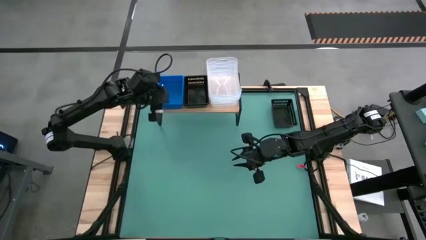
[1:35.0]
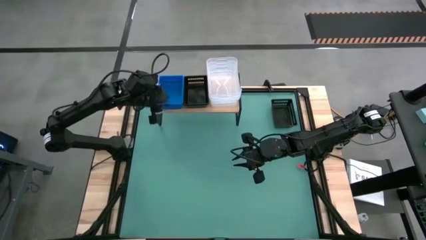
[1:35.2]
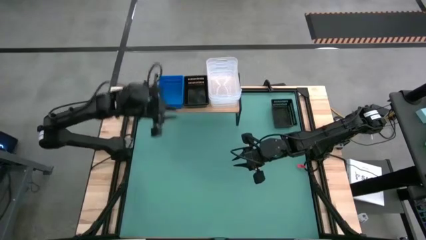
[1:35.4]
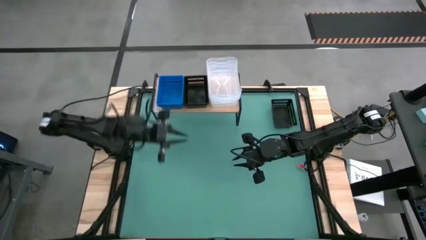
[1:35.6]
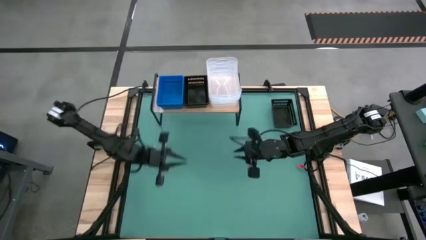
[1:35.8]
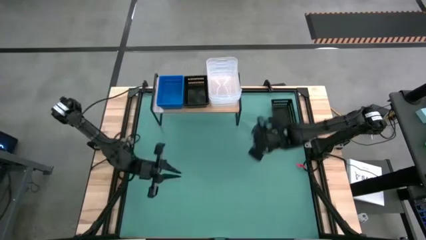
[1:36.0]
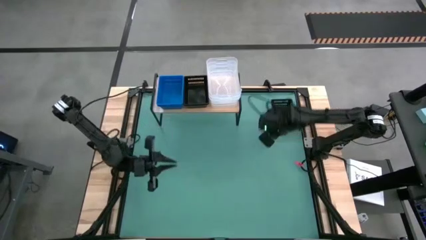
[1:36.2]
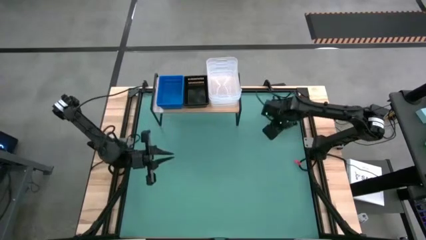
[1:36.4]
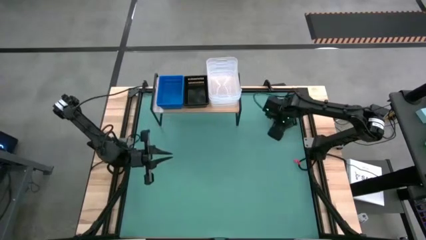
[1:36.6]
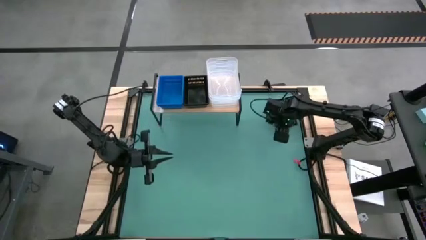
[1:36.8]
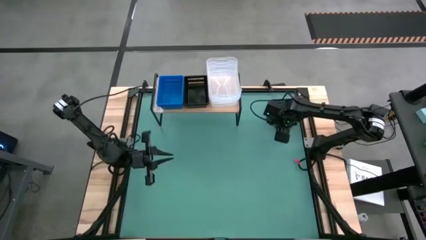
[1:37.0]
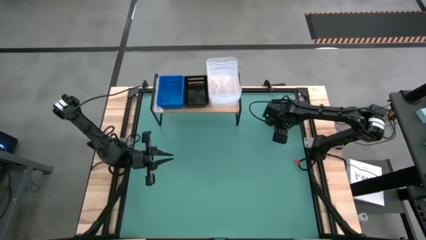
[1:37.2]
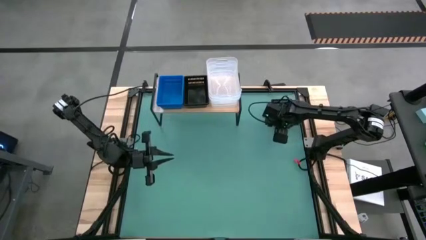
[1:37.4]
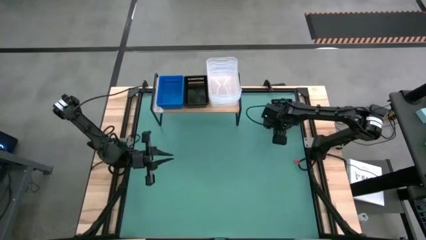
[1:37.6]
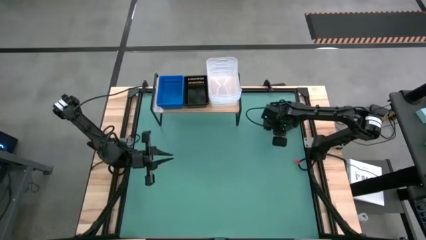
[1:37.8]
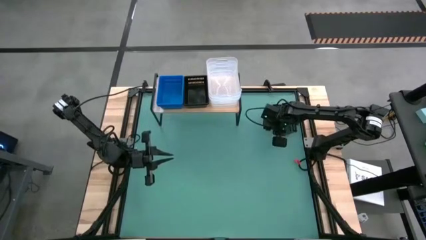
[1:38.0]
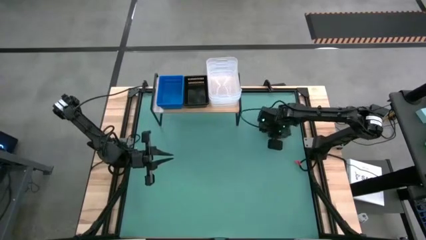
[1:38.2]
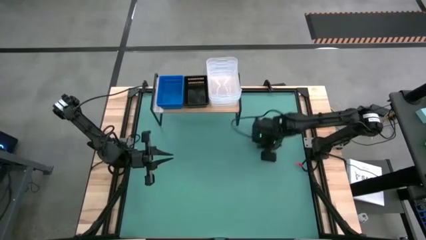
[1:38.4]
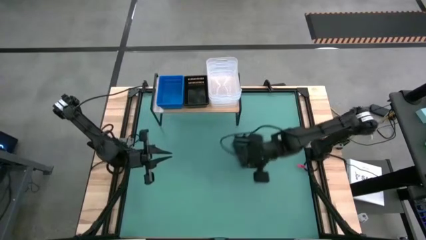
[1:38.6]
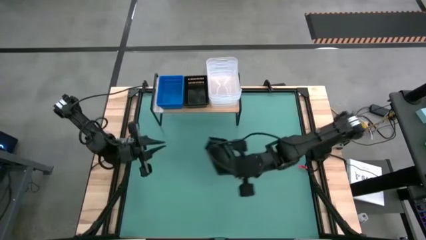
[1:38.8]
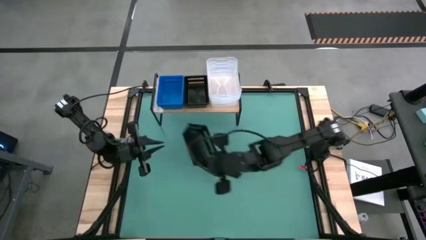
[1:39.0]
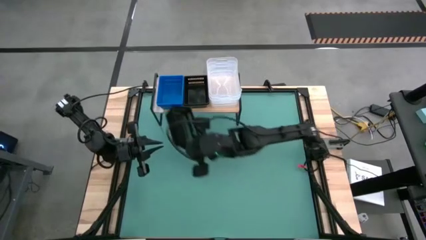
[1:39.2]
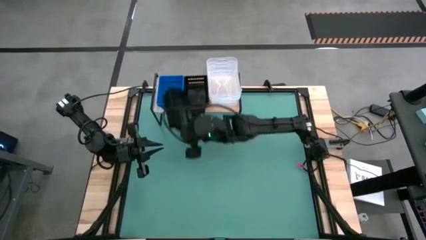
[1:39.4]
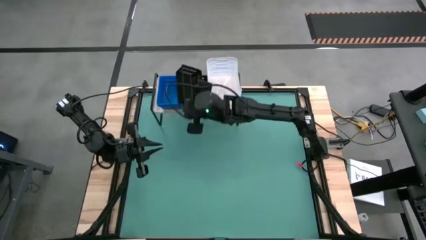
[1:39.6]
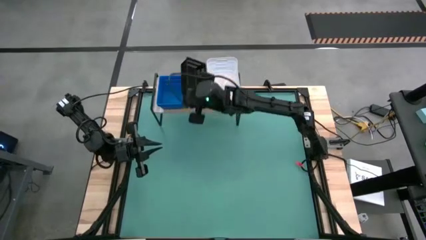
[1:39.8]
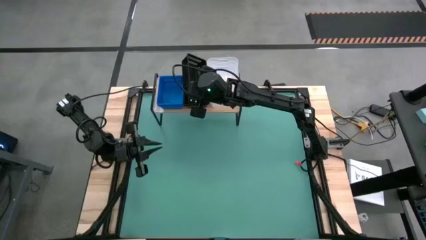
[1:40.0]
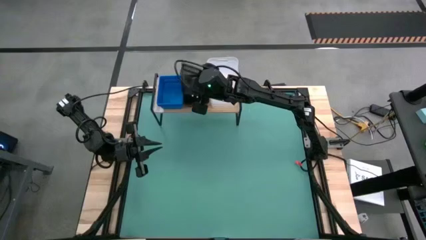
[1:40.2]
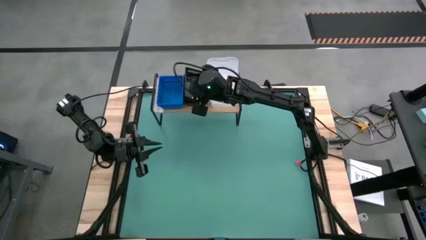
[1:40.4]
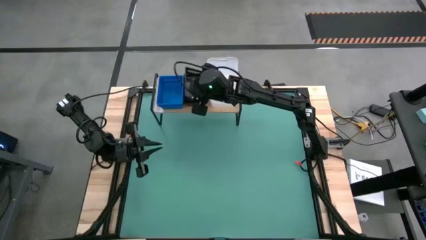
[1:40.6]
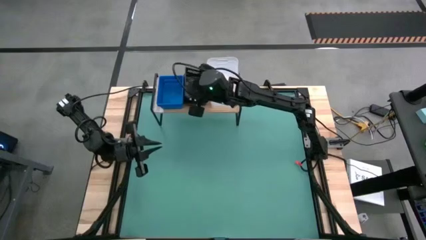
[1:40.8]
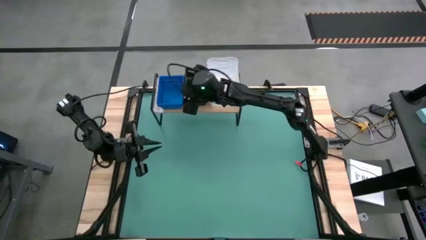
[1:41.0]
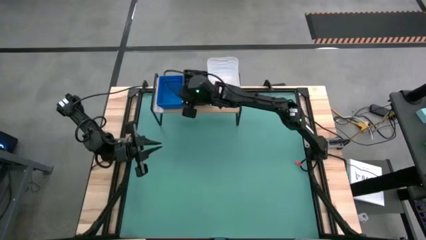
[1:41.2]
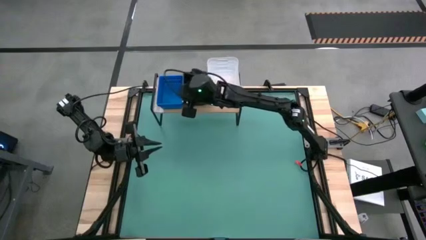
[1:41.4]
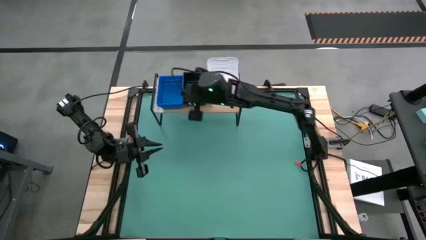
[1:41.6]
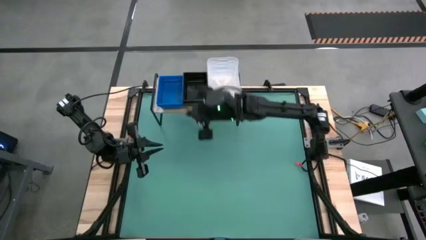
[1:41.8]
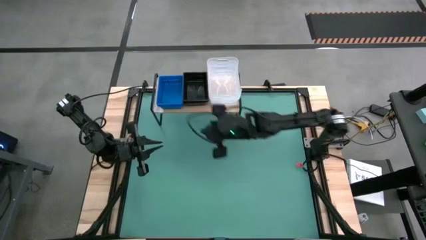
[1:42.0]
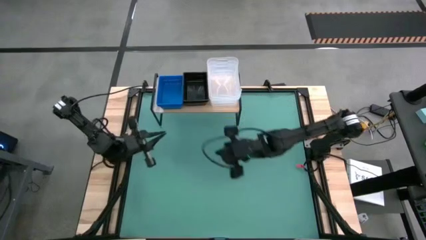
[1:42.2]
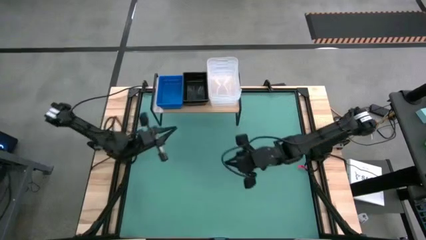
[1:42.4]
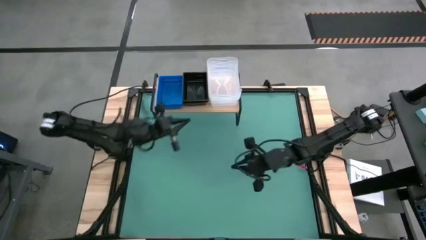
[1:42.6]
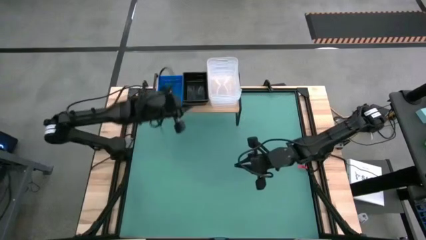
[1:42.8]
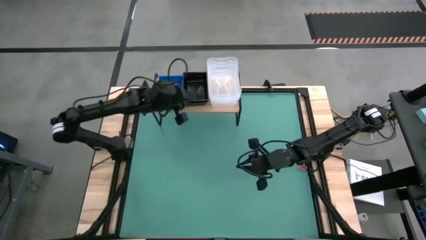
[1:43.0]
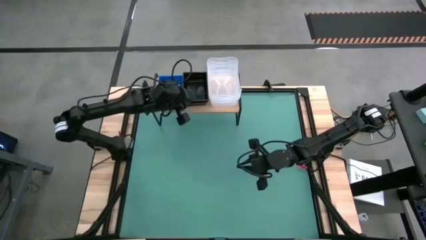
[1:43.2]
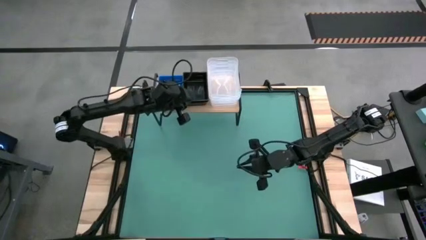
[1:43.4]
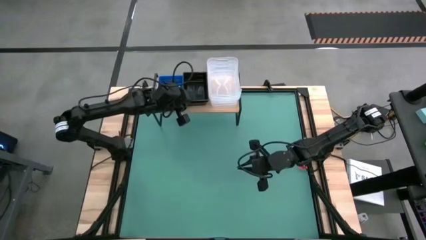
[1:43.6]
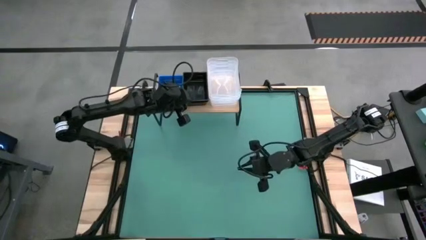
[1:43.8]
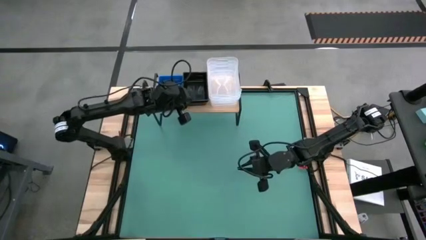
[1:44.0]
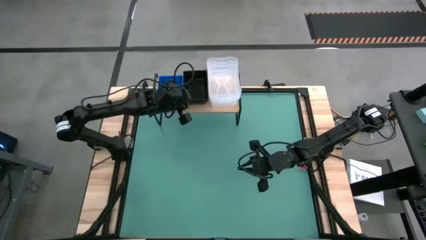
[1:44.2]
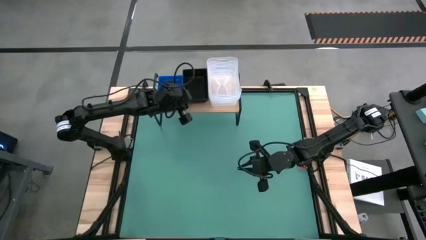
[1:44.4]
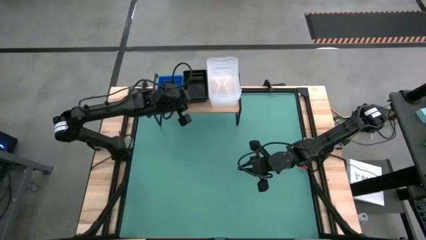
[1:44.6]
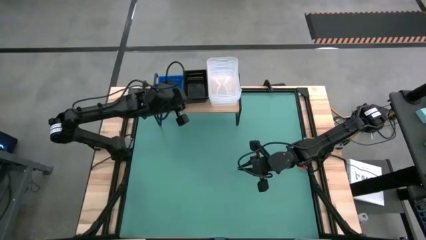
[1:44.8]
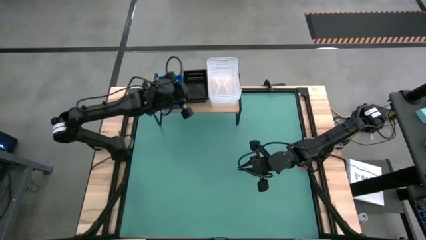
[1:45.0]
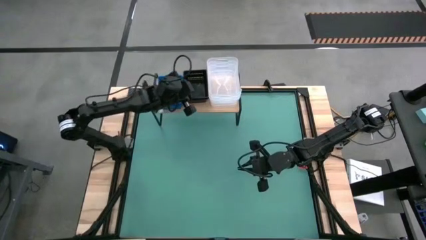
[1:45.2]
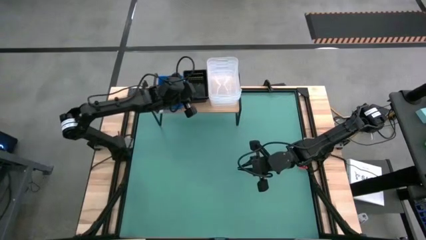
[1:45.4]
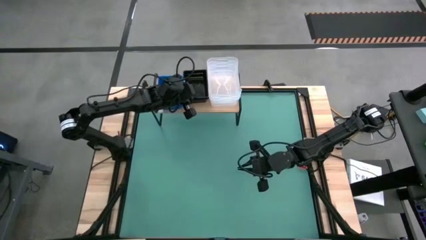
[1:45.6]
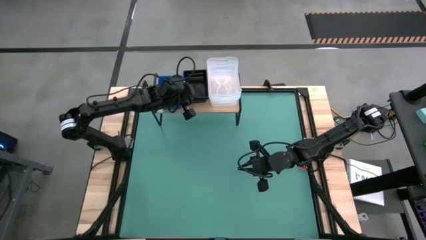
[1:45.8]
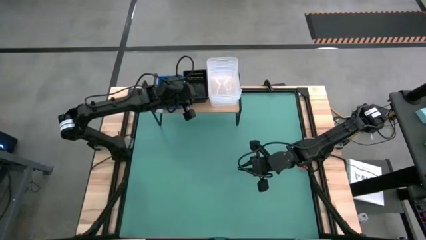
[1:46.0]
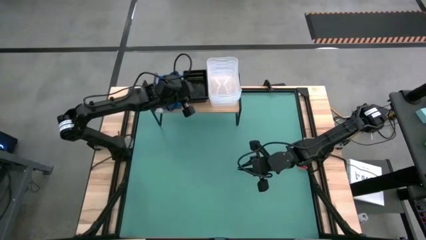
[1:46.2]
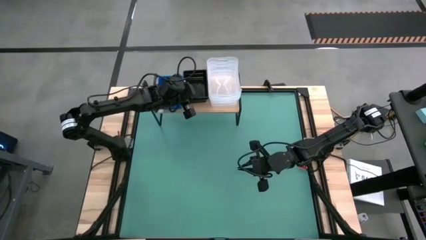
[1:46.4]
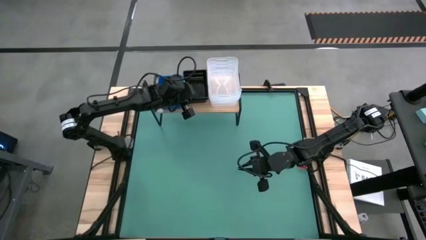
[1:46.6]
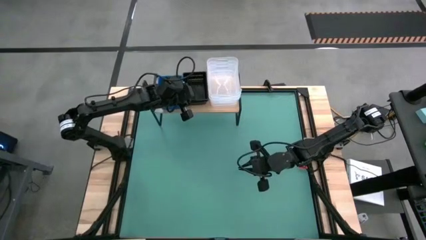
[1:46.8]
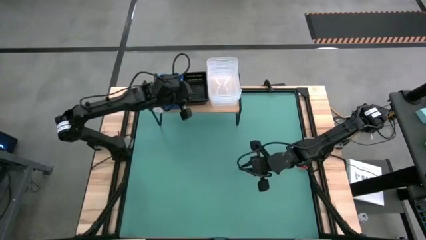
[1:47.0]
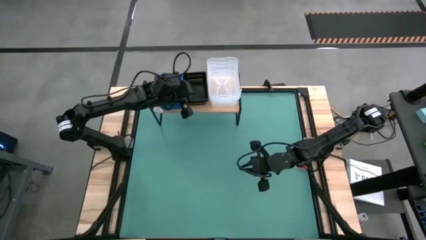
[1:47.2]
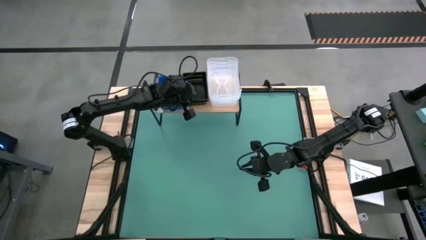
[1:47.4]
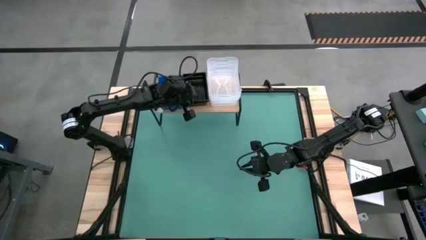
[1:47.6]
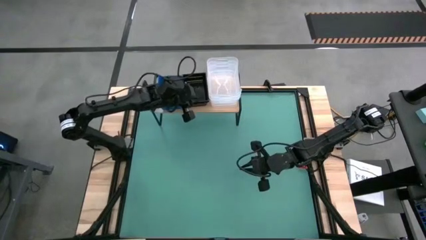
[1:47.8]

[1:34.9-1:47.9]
Task: Stack baskets on shelf by color
Stack the black transparent bin on the other black bins on the shelf

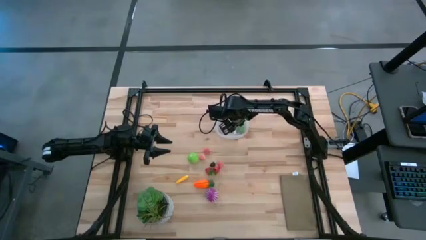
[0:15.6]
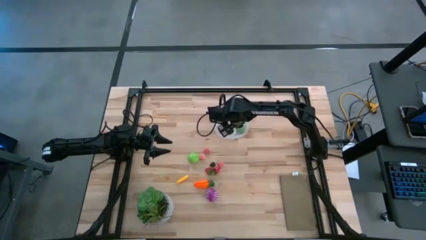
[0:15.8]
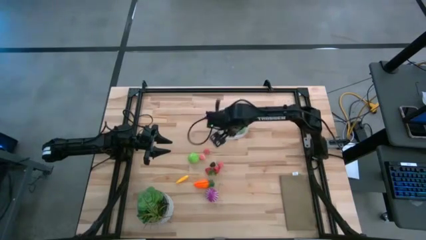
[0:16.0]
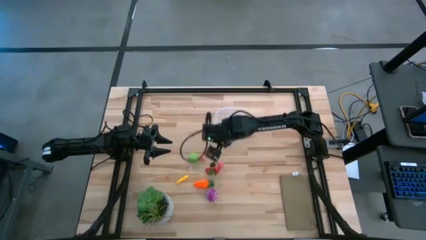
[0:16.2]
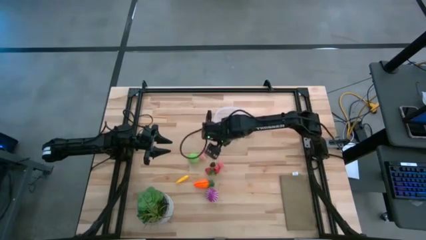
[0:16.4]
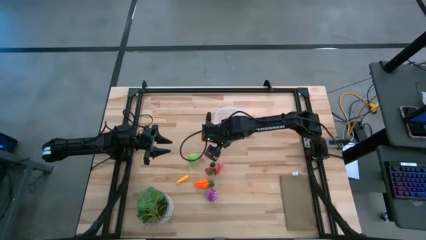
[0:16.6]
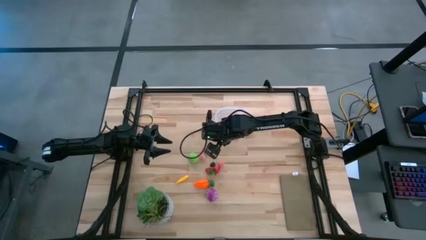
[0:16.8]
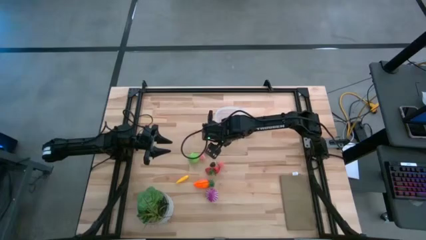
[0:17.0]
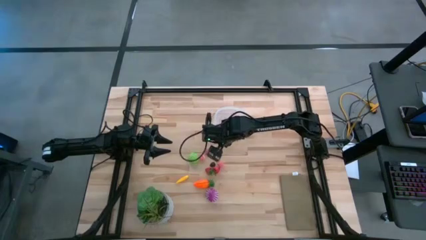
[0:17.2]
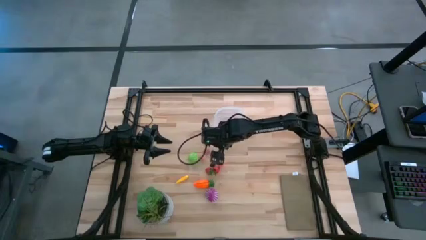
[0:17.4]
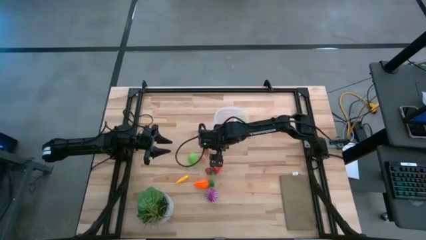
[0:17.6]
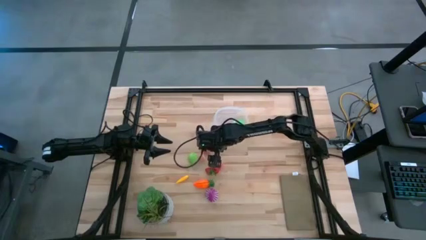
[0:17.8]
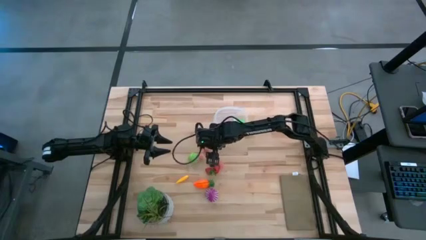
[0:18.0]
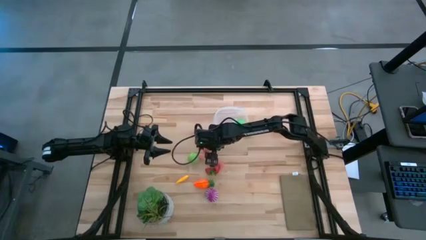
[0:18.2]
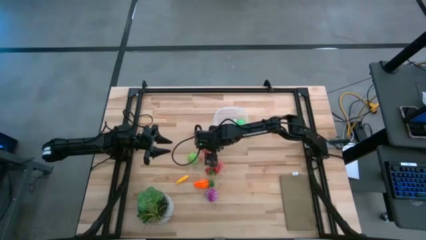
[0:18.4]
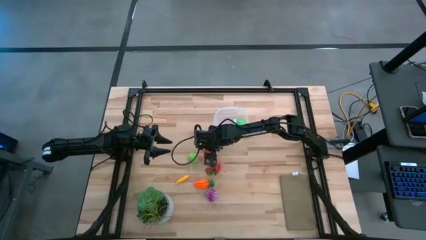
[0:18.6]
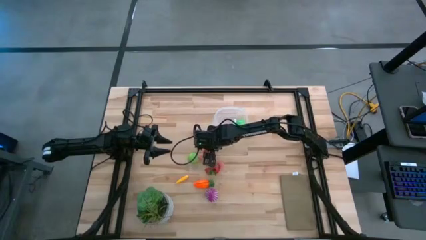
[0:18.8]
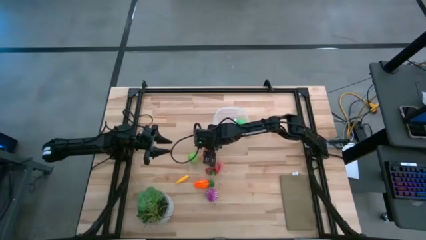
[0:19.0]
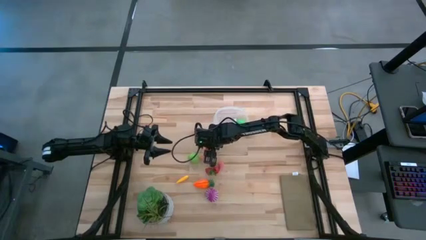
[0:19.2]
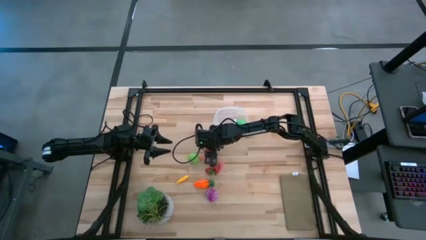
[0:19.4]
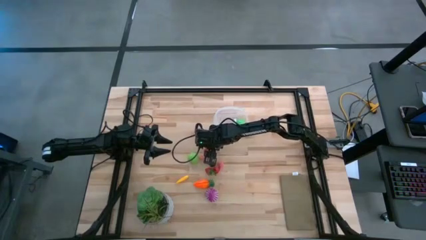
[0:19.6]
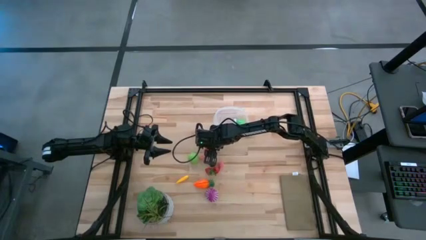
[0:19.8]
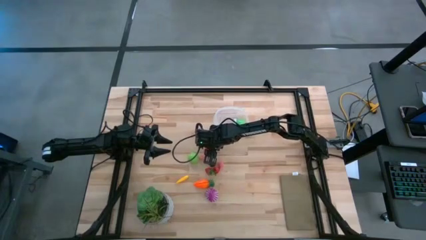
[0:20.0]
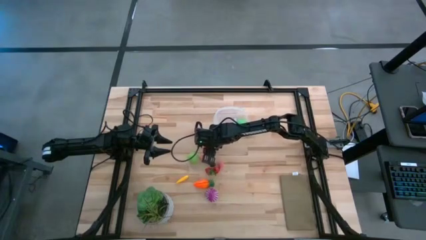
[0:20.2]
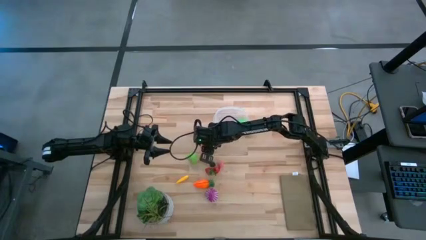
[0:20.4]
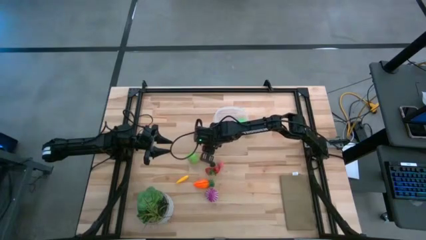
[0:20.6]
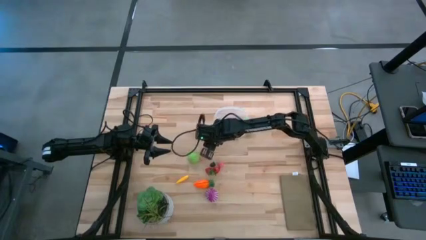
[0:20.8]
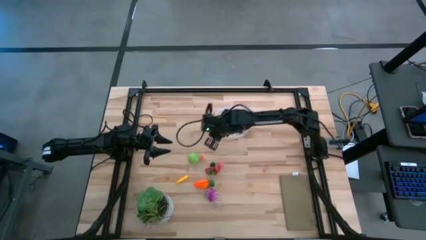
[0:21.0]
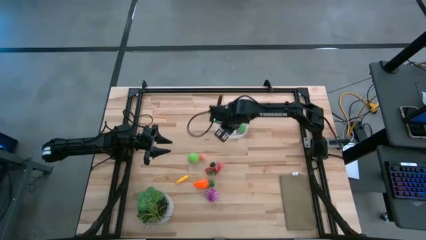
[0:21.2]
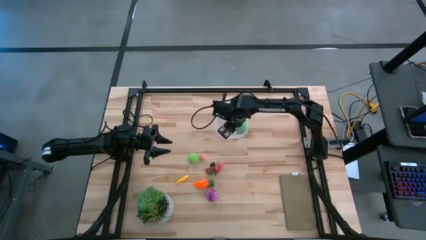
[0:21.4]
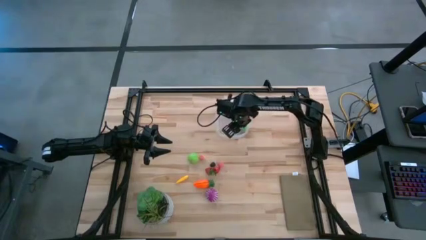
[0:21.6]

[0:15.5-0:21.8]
Task: Pick and placing Produce into tupperware
Put the top pink peach into the transparent bin
